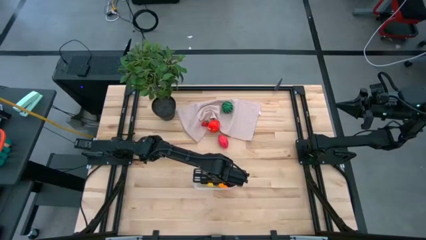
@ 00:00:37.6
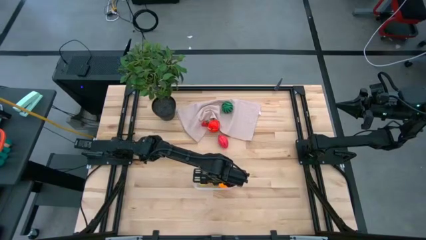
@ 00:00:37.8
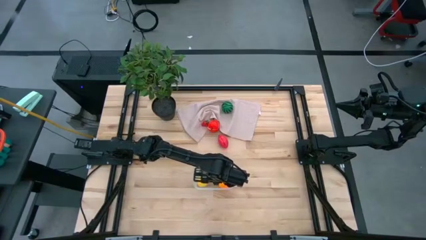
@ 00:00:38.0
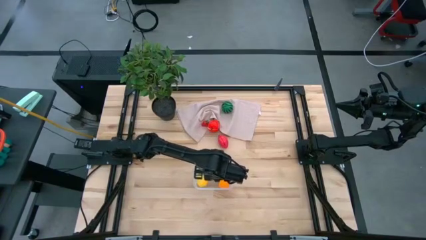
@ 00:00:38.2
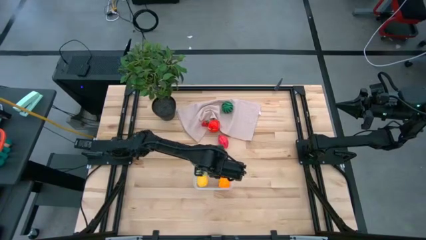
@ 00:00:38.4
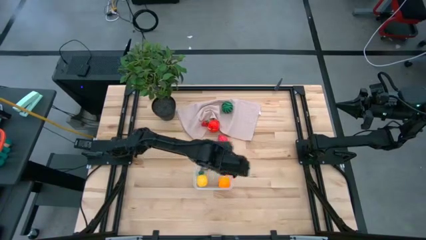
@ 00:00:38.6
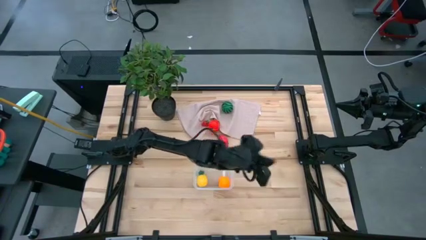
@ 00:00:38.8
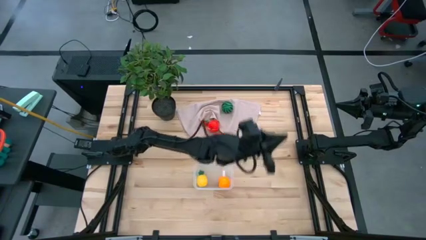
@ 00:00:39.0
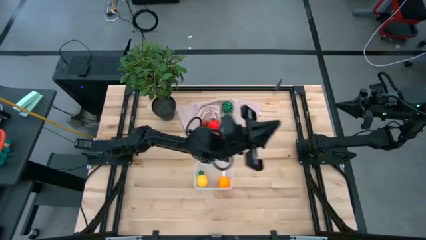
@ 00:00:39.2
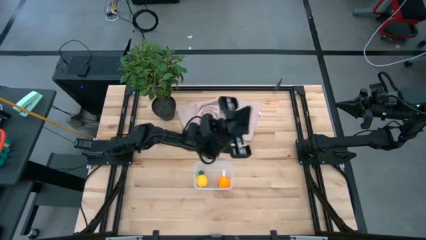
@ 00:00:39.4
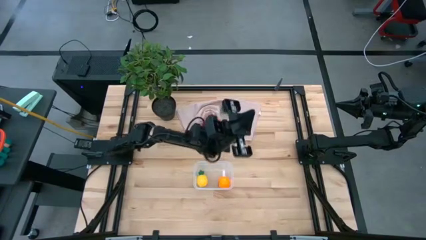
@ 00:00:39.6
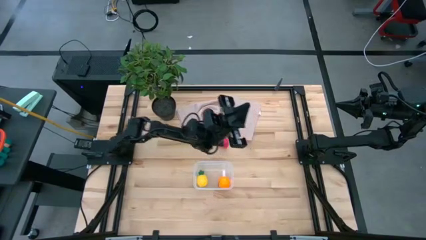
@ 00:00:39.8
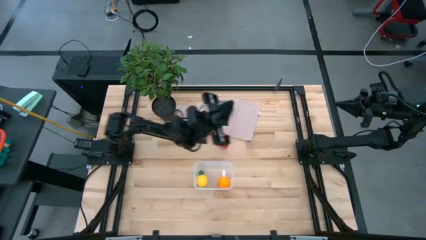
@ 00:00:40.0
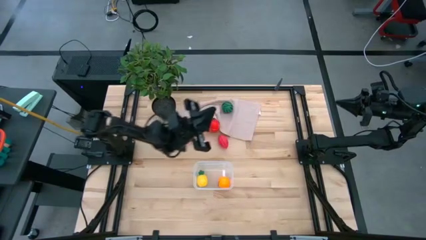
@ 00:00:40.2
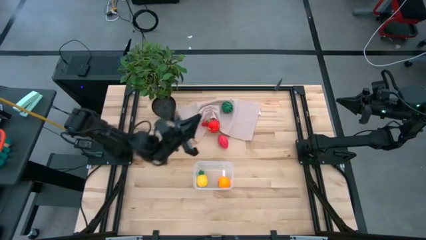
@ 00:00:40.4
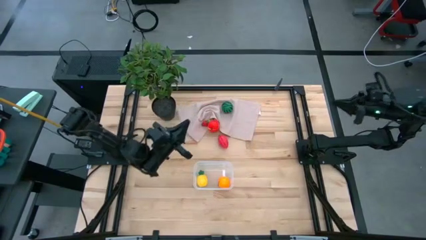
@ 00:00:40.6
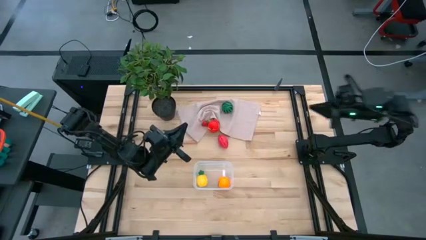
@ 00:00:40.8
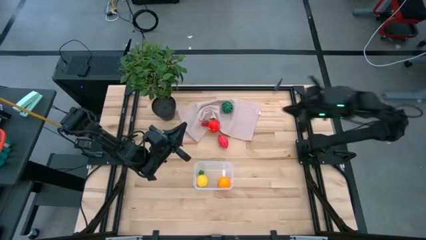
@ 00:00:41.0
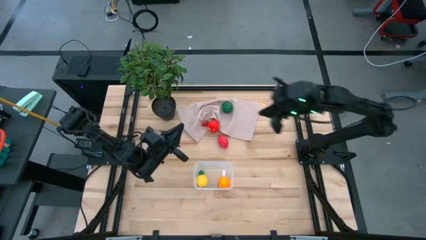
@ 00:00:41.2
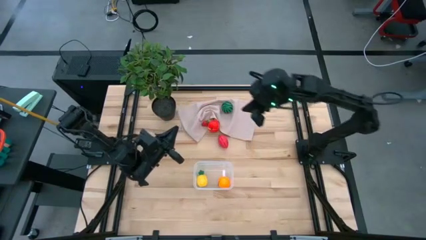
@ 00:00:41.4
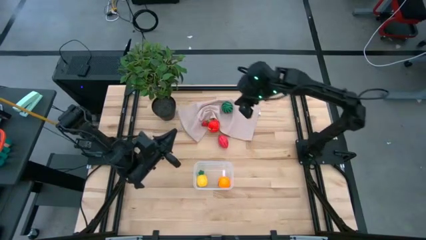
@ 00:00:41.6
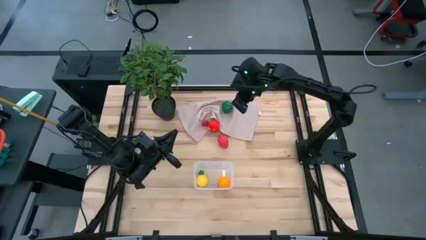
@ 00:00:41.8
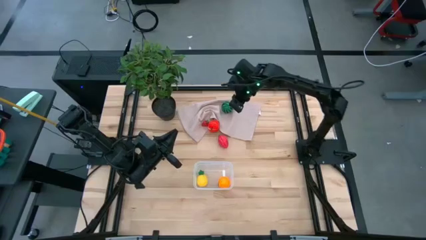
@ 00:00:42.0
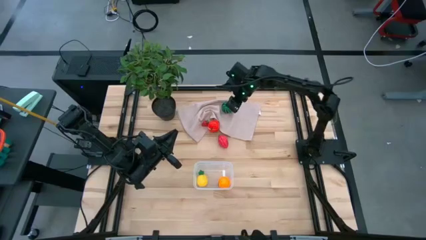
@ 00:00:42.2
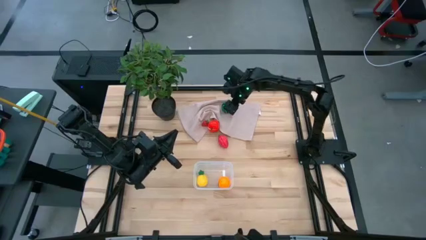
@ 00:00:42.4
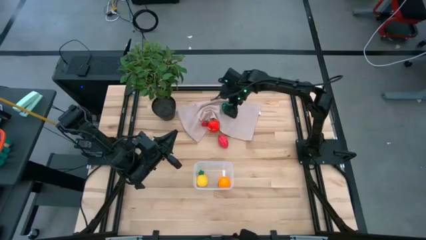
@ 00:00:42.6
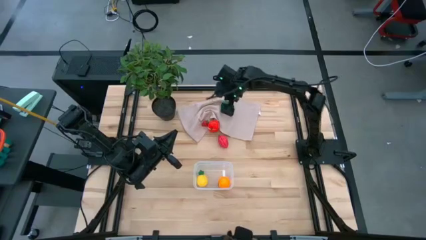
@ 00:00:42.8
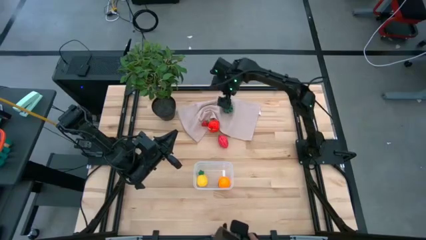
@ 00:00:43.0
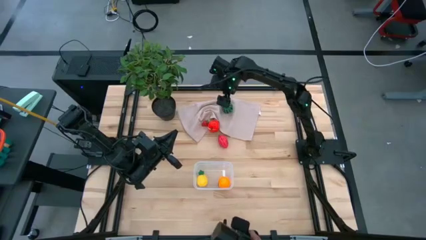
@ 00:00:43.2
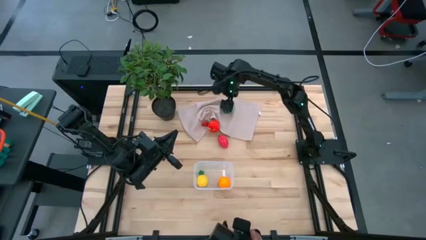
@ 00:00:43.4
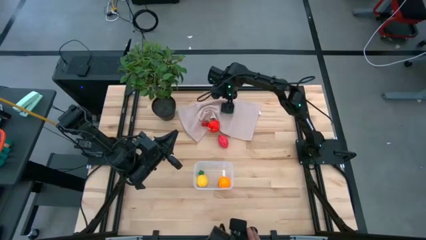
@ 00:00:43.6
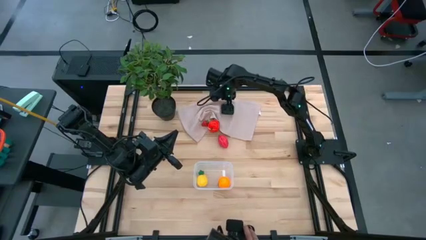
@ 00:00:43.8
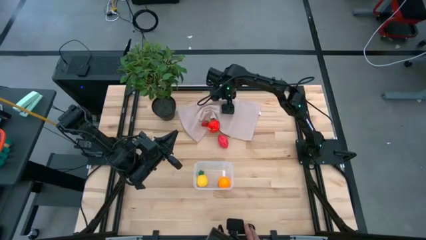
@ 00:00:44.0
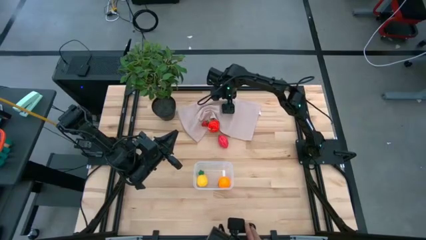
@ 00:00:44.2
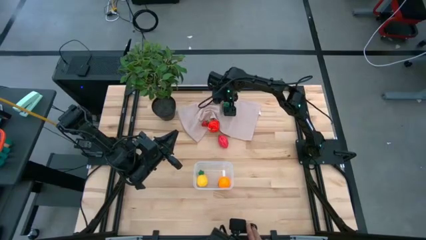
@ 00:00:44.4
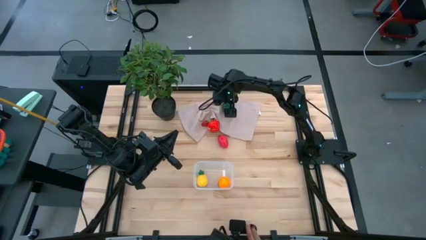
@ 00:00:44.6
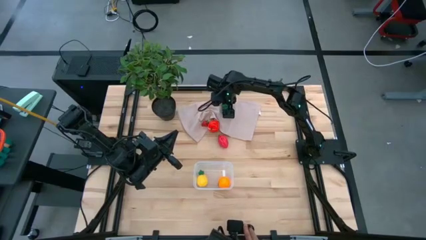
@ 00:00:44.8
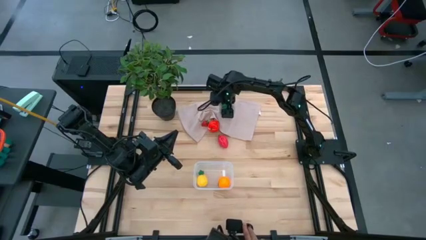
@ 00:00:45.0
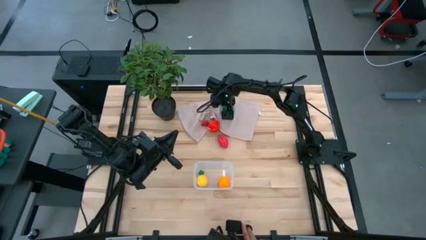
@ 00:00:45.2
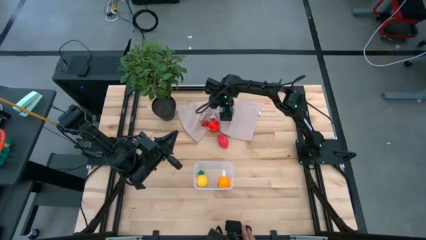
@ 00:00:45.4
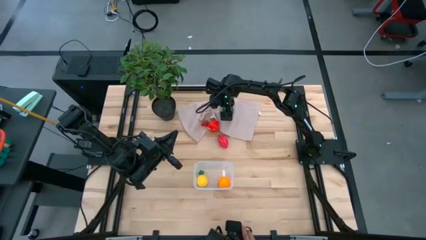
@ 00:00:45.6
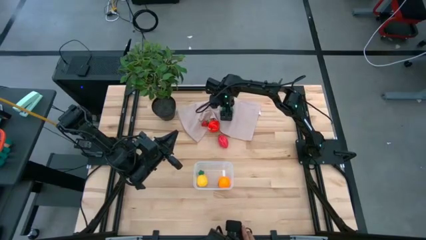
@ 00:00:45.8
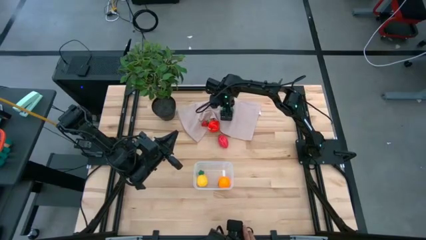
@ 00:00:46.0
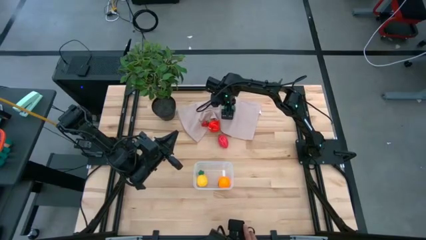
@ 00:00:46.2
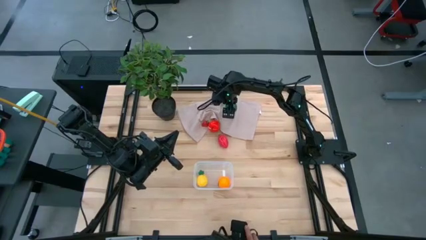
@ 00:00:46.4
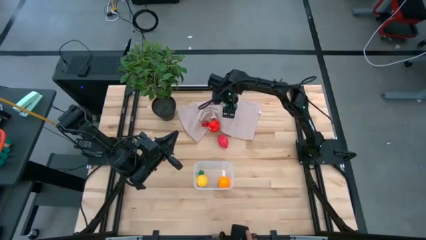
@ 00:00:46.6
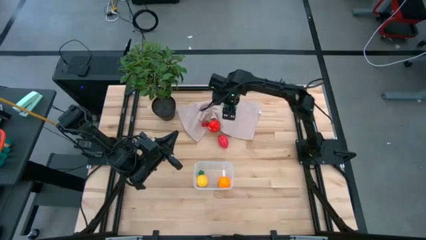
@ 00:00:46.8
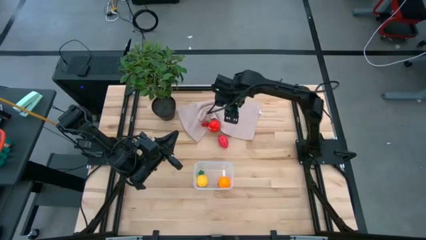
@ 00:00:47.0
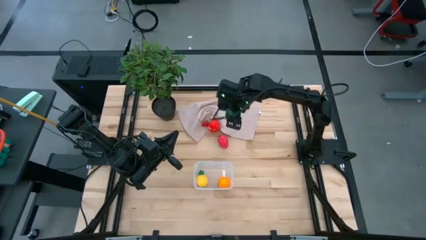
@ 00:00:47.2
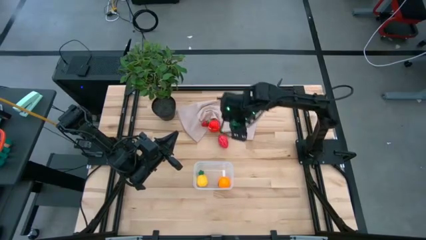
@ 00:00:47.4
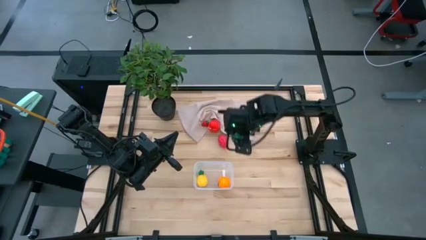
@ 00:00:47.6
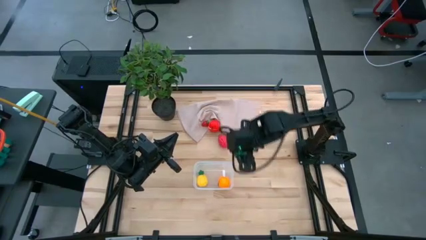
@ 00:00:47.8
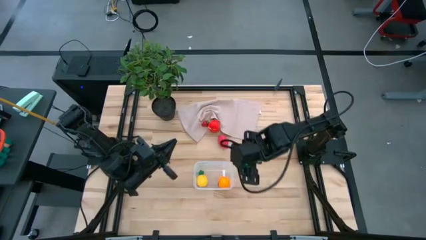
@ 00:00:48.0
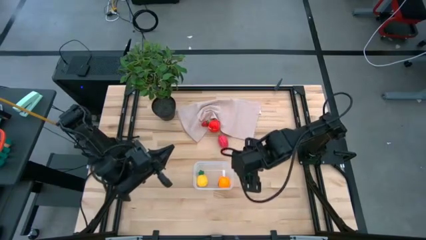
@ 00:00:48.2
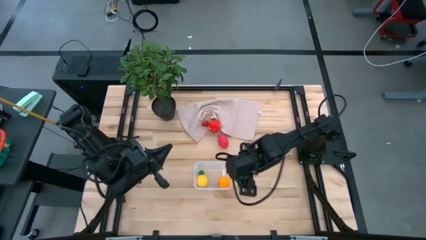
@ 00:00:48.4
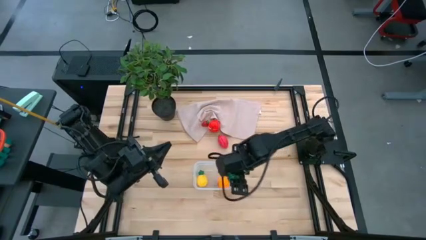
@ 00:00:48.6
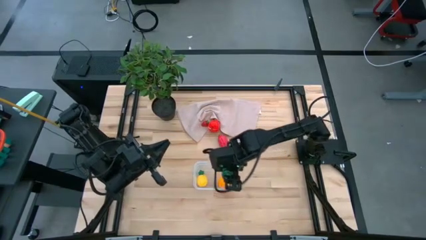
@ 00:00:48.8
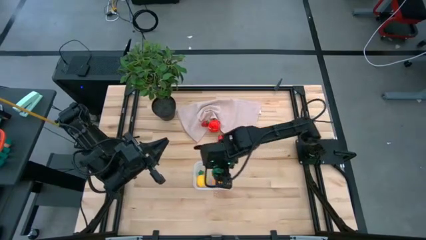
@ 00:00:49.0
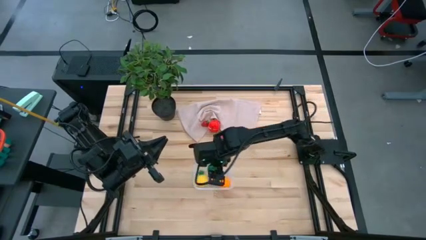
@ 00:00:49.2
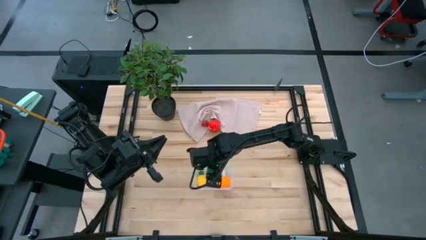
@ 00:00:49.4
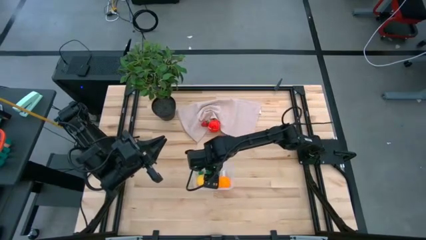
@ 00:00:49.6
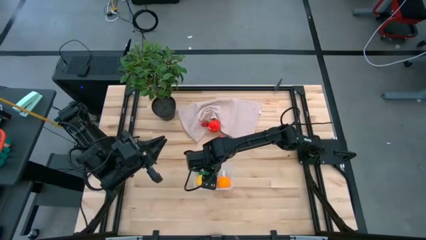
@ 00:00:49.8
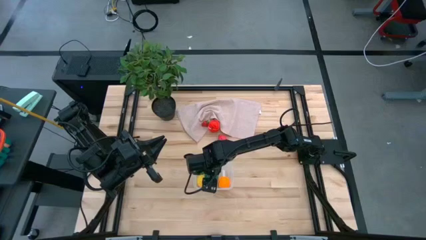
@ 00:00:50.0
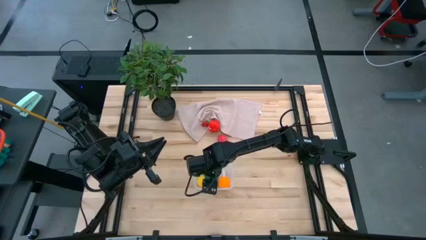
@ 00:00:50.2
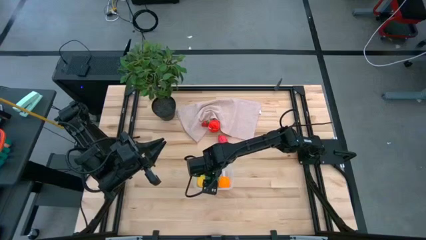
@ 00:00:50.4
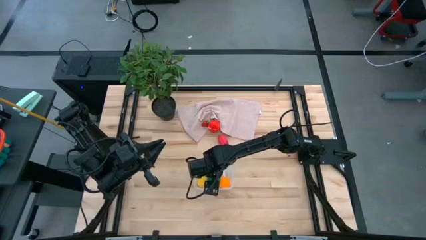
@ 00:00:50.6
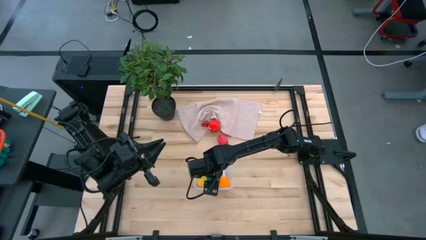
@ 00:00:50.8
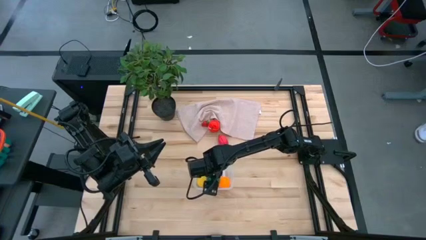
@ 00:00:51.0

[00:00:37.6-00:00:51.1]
Task: Pick and placing Produce into tupperware
Put the watermelon into the transparent bin
